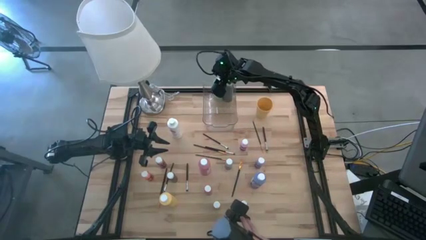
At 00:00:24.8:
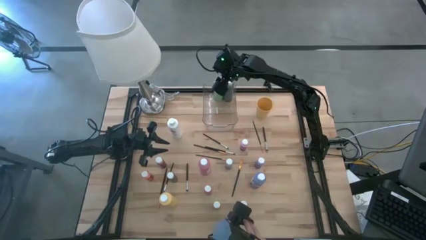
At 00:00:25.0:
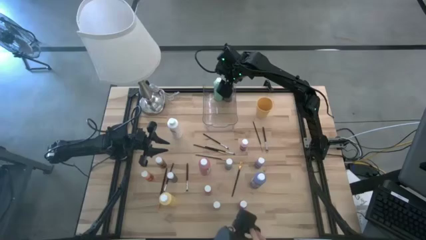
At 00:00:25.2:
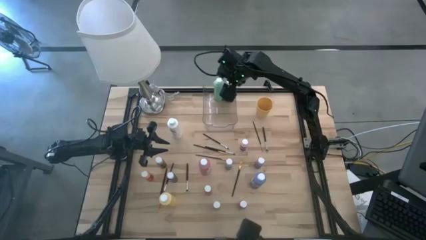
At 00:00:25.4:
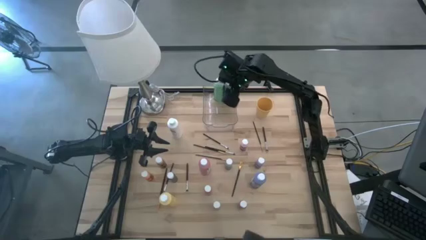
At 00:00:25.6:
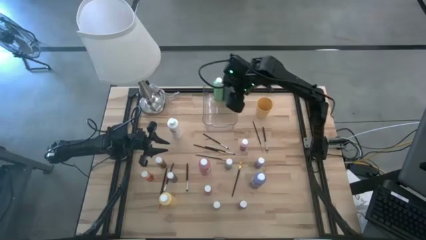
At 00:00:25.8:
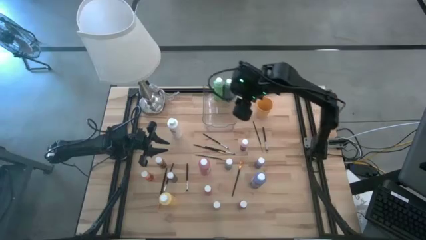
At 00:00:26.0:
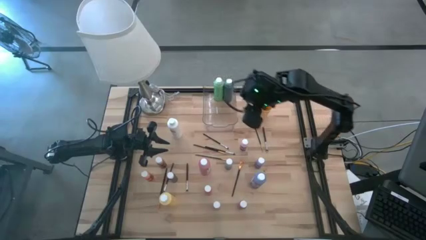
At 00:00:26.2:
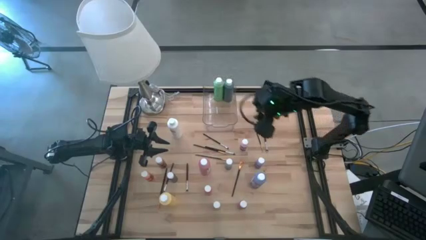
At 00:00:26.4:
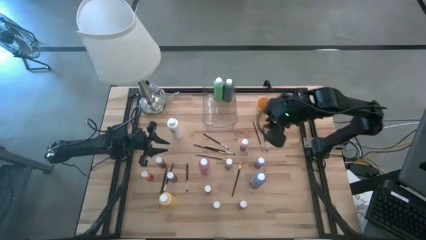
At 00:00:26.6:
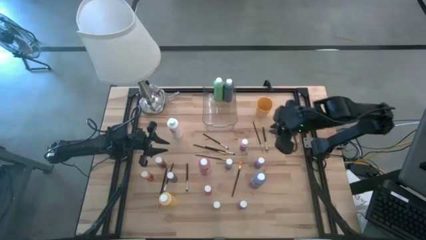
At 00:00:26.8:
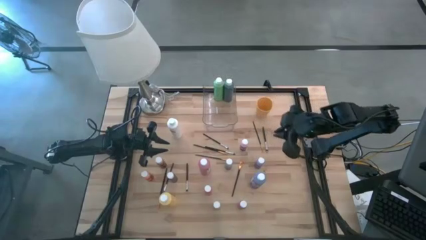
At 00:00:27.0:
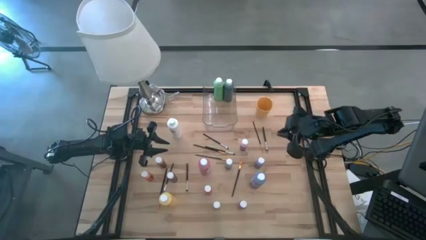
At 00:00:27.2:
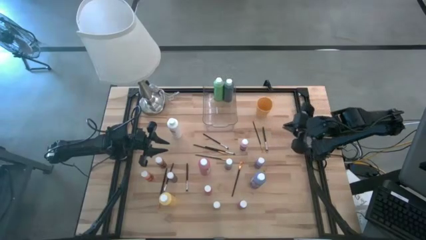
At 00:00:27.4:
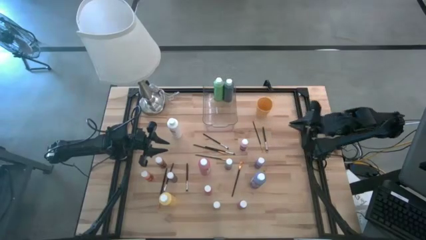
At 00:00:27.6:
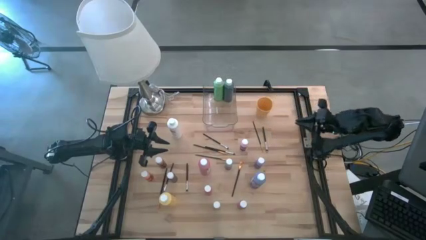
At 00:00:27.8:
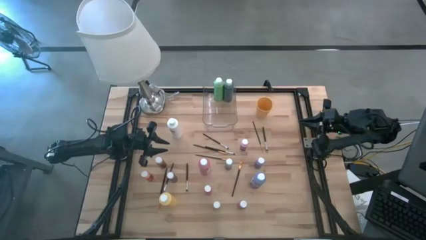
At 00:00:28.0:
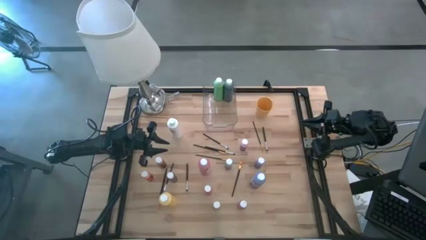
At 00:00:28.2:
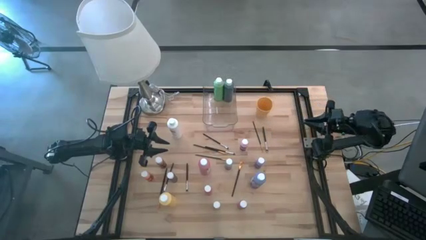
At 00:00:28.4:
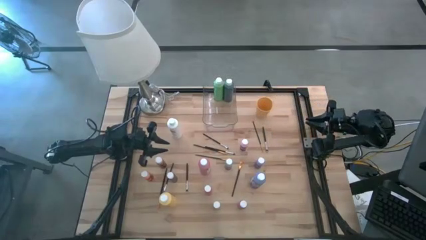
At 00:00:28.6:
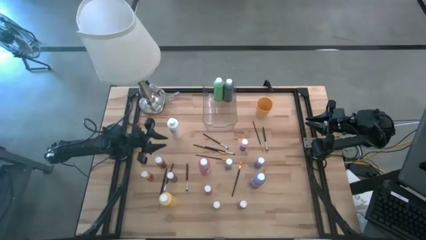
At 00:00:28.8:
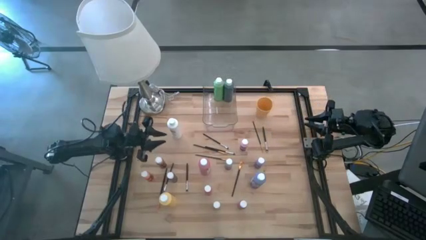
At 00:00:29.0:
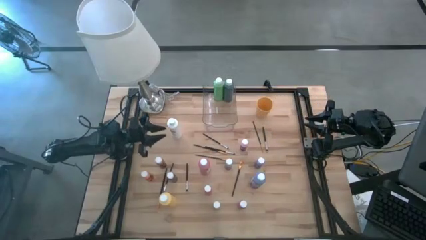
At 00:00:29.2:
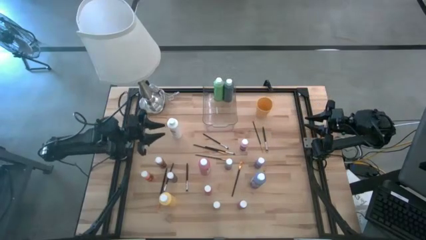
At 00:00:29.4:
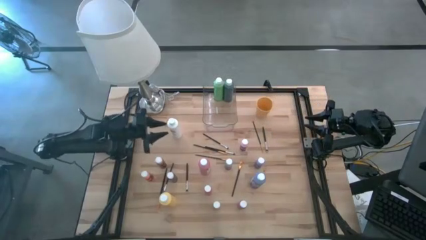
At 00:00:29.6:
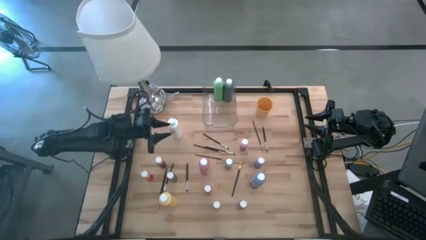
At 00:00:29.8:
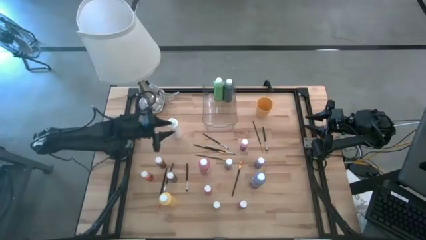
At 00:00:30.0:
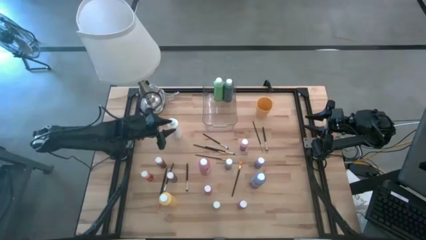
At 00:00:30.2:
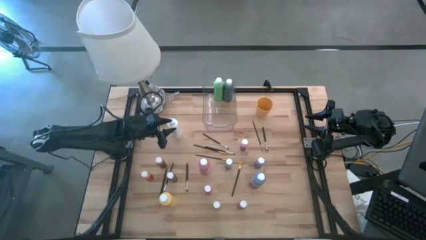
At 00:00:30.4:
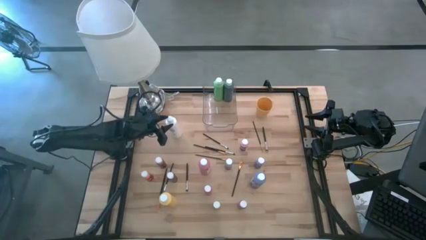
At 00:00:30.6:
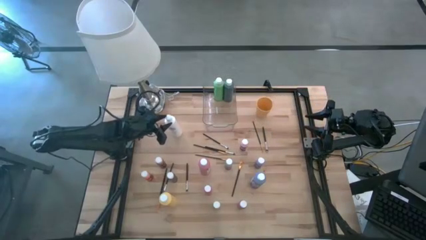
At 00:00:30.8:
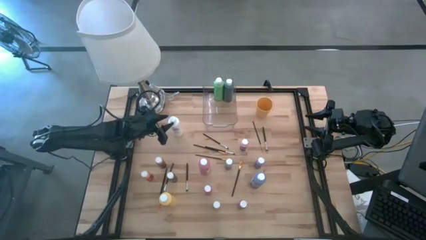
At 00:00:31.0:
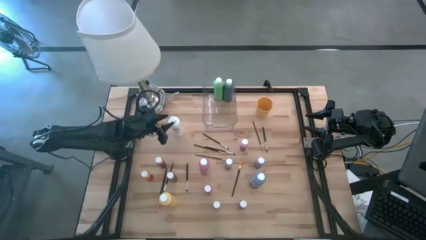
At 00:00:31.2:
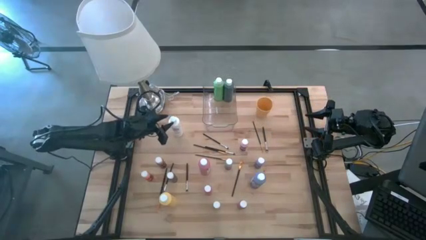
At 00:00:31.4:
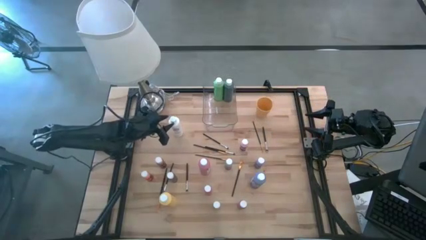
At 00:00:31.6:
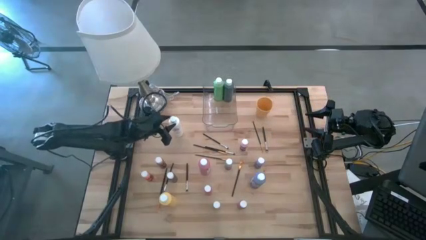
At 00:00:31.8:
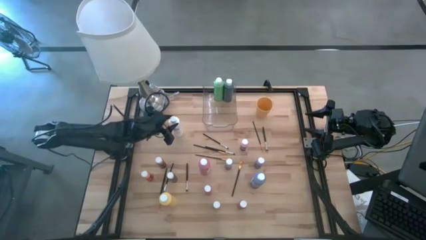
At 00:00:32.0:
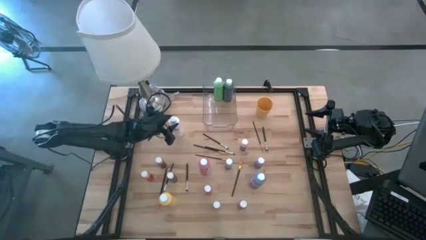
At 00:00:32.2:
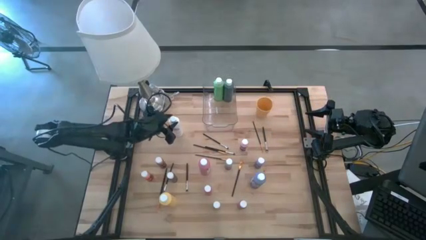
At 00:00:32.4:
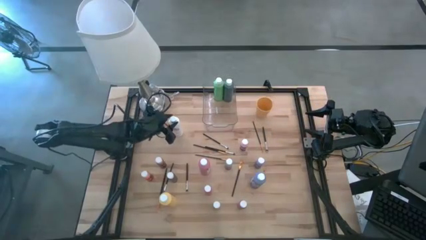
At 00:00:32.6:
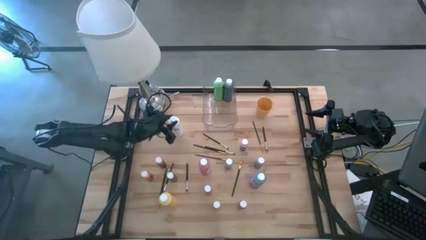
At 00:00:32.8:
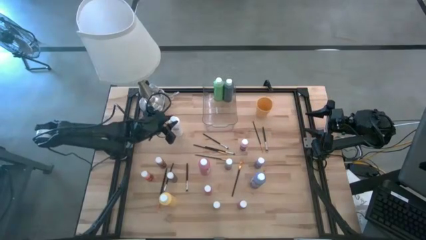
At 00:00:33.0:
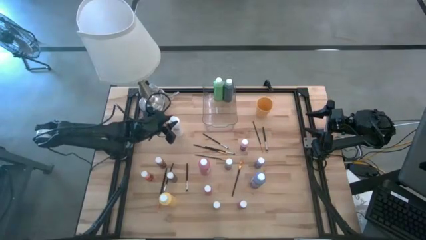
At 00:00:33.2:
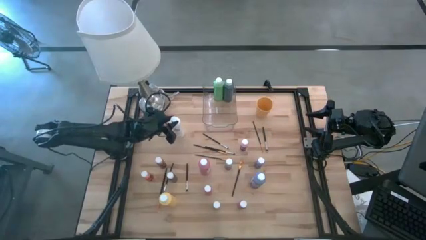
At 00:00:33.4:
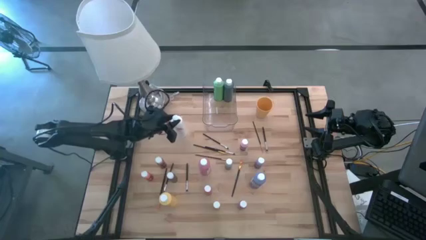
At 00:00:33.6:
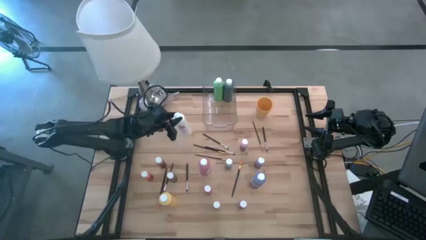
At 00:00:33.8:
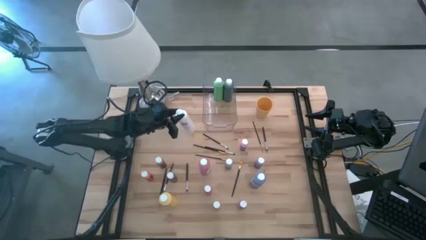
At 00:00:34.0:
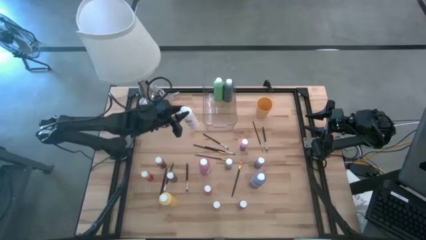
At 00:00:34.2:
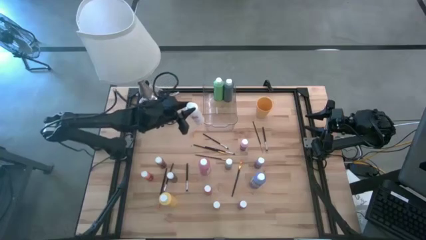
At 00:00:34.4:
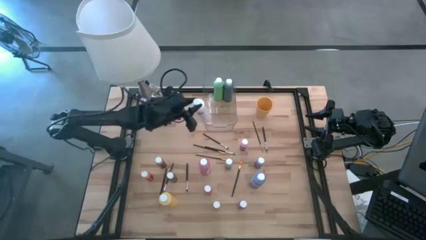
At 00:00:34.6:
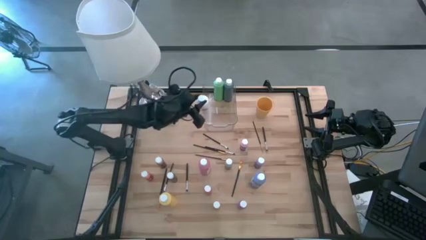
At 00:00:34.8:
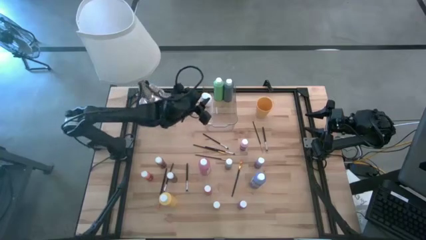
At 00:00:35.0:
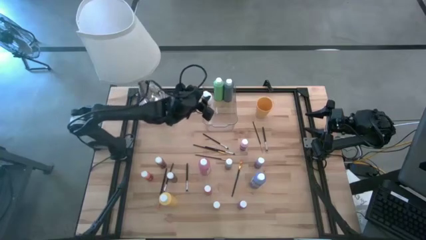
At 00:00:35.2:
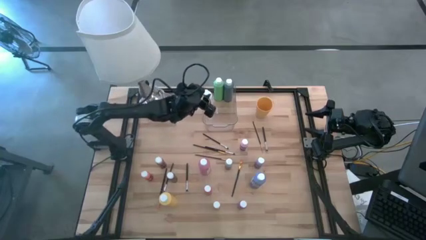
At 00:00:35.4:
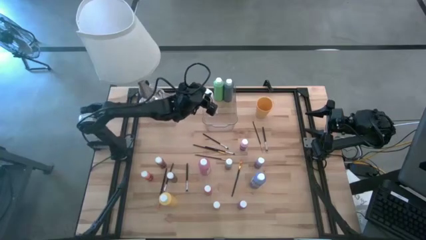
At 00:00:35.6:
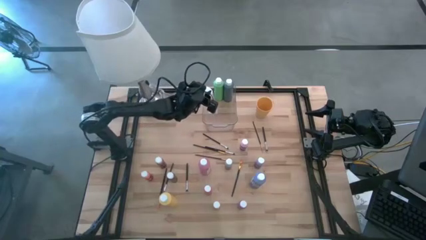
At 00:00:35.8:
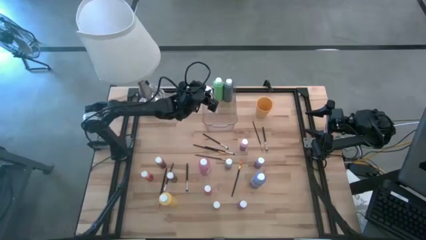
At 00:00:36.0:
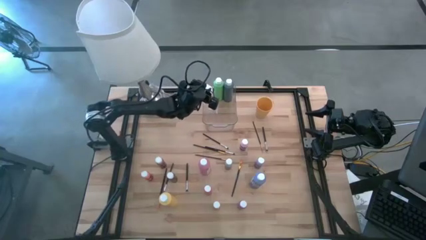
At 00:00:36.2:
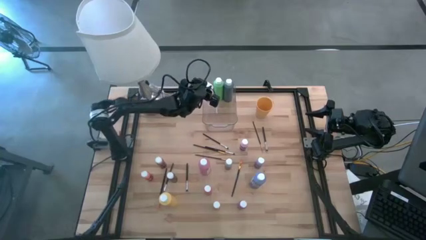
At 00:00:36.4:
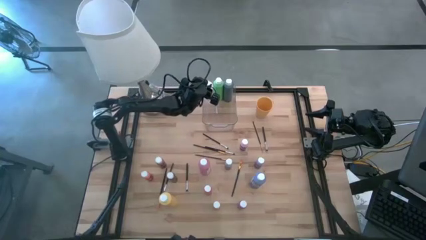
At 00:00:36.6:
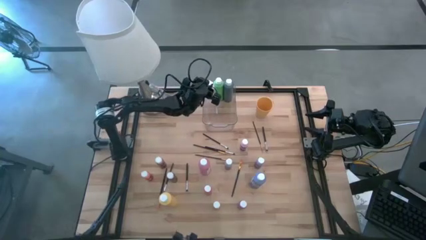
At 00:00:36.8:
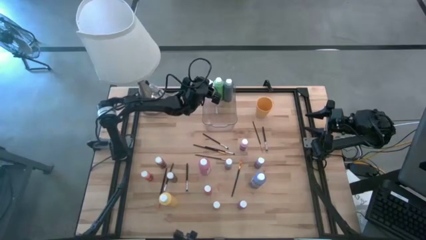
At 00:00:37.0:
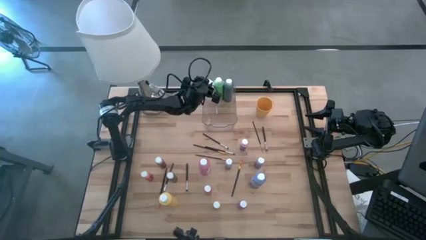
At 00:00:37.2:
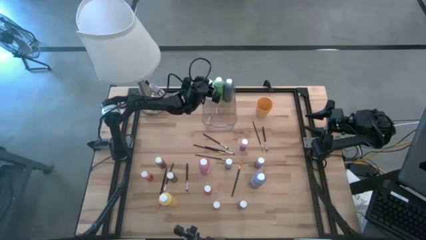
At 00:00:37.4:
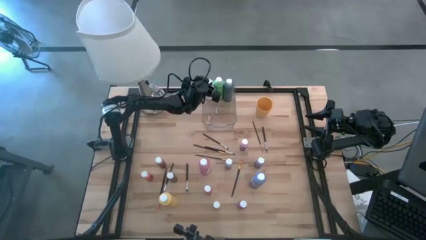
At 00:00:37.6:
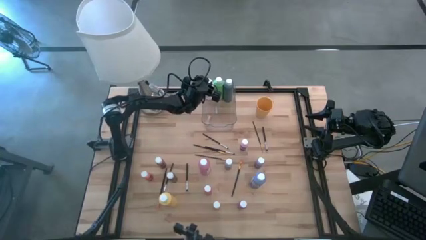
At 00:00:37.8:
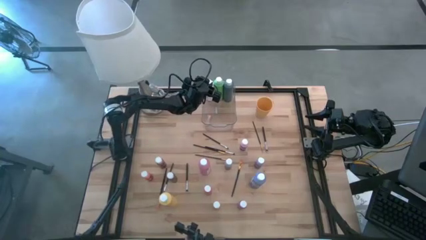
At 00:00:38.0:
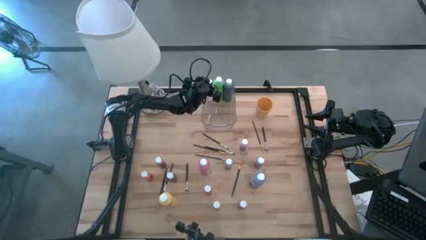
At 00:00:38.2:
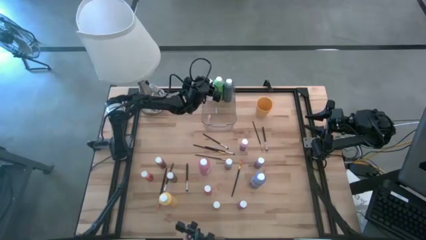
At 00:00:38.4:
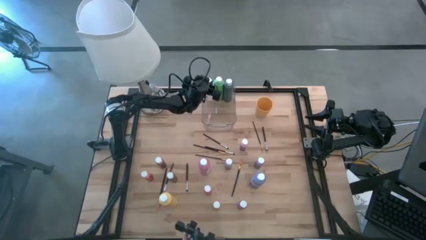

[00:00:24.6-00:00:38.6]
Task: Pick & Place Paint Supplies
Put the big white paint bottle into the bin
